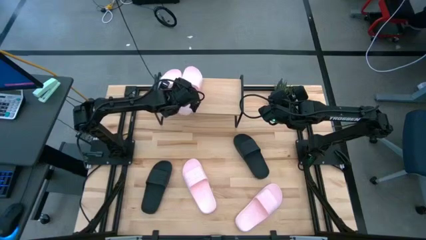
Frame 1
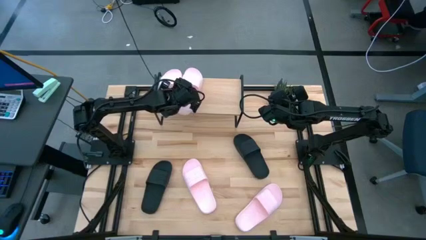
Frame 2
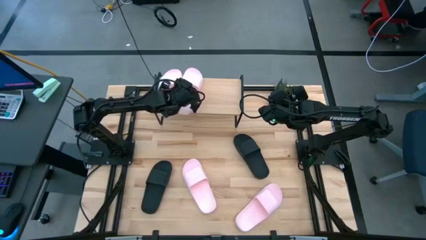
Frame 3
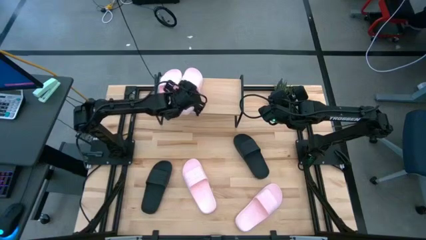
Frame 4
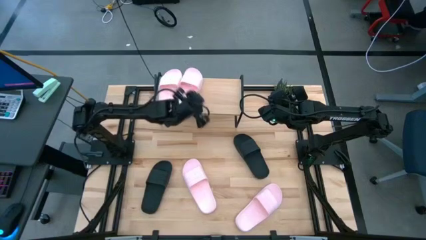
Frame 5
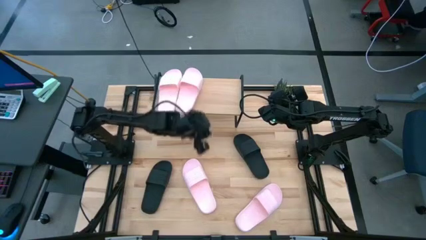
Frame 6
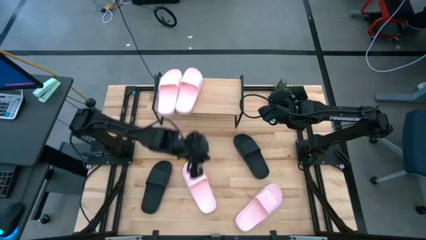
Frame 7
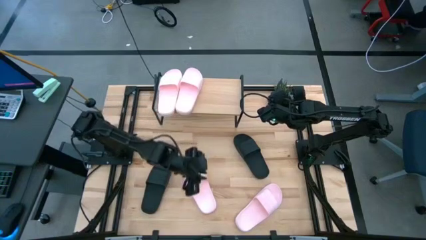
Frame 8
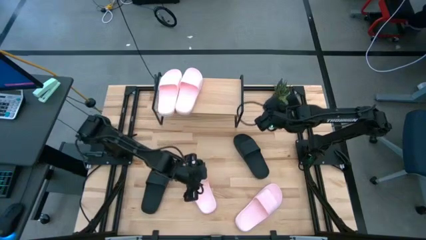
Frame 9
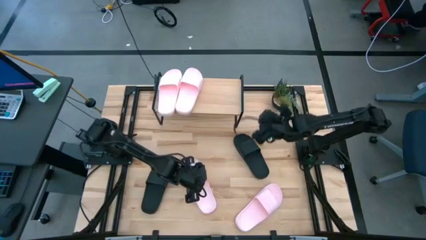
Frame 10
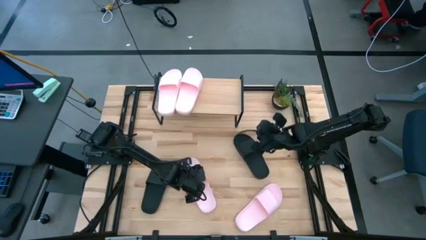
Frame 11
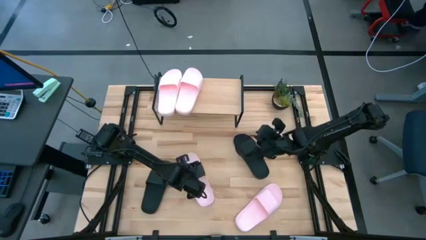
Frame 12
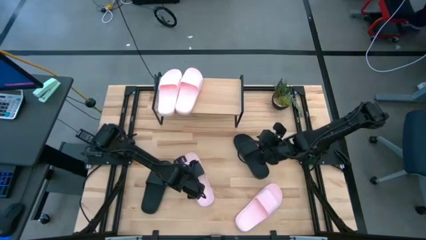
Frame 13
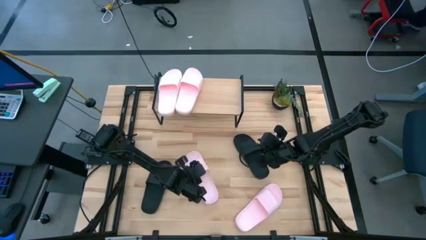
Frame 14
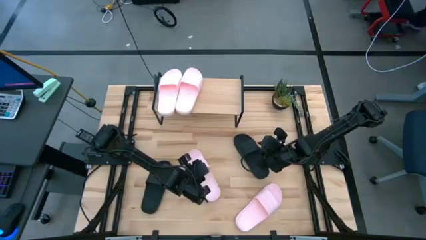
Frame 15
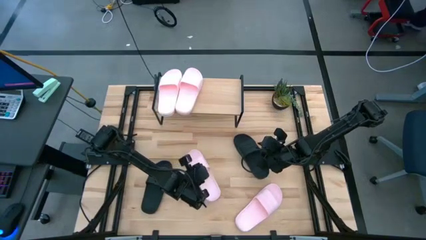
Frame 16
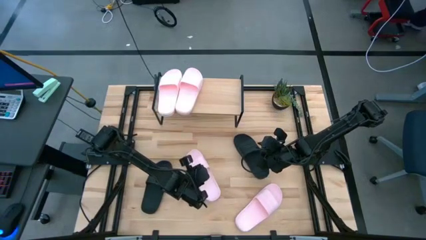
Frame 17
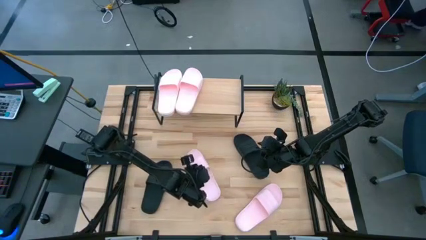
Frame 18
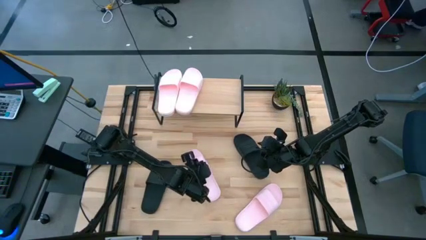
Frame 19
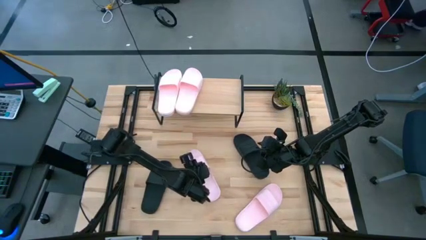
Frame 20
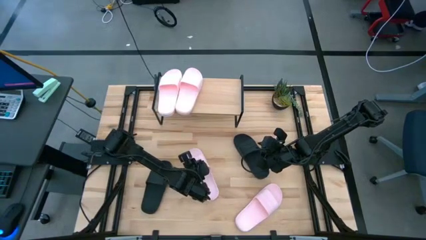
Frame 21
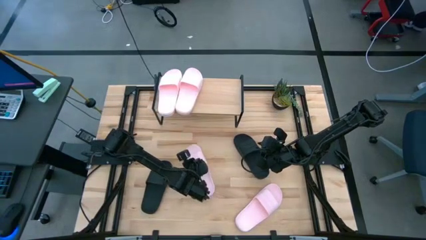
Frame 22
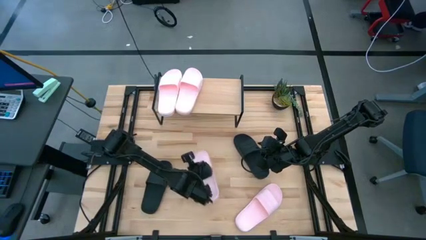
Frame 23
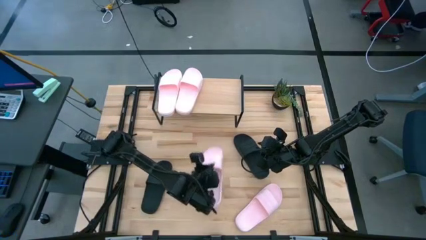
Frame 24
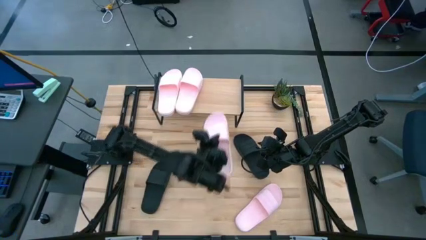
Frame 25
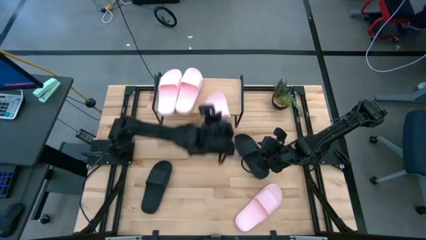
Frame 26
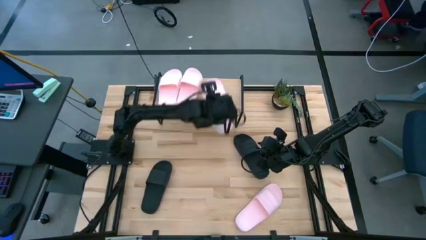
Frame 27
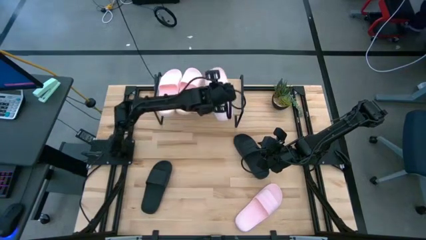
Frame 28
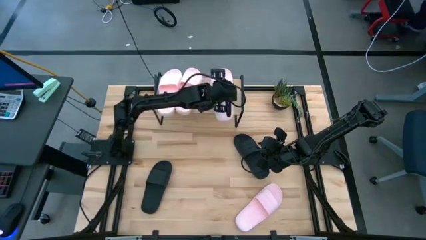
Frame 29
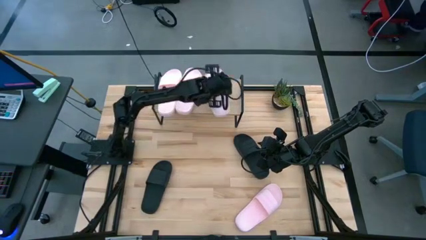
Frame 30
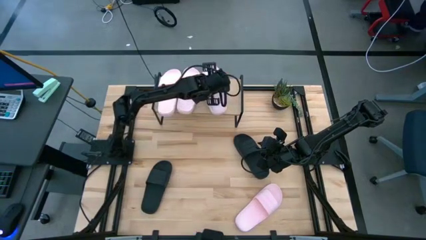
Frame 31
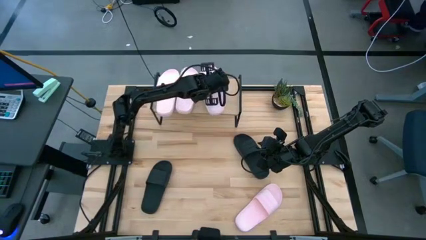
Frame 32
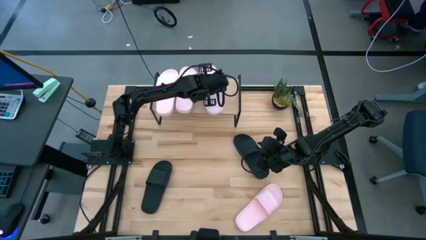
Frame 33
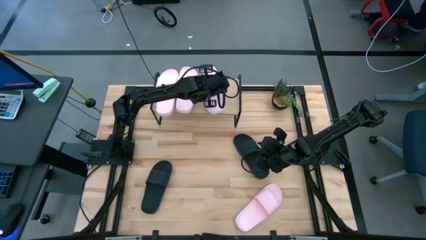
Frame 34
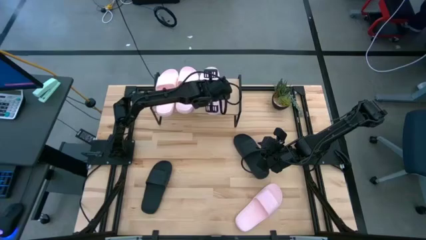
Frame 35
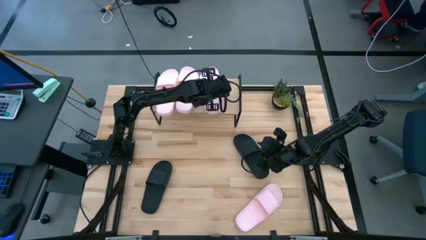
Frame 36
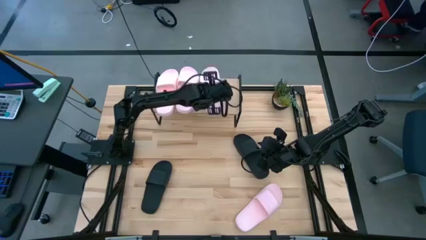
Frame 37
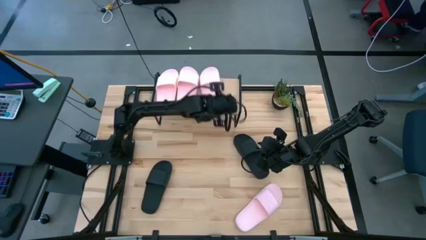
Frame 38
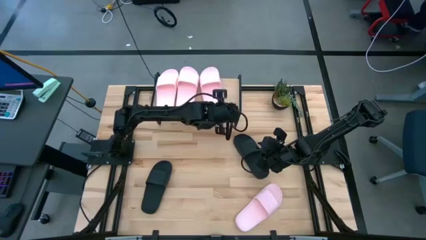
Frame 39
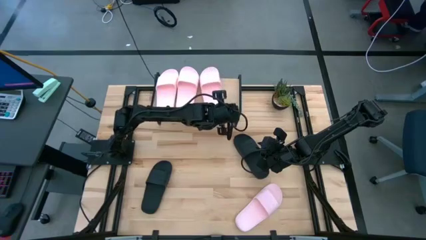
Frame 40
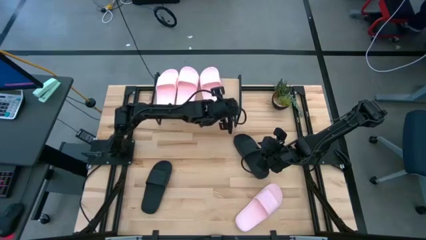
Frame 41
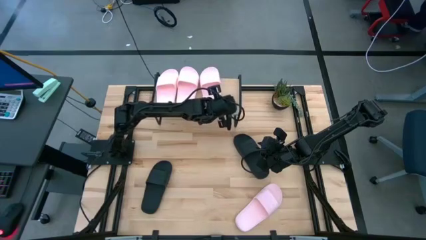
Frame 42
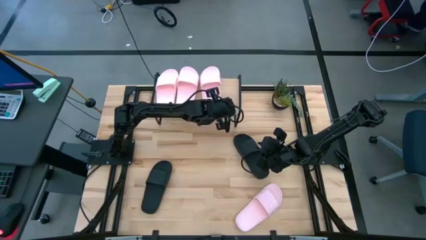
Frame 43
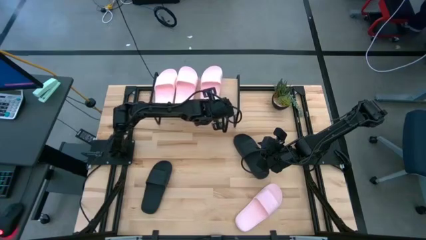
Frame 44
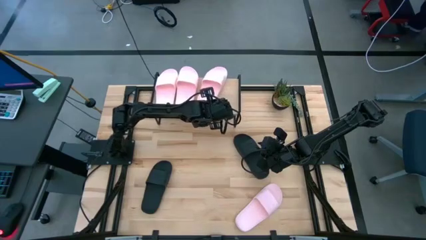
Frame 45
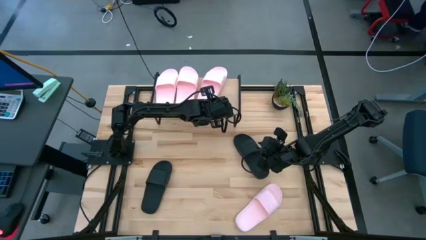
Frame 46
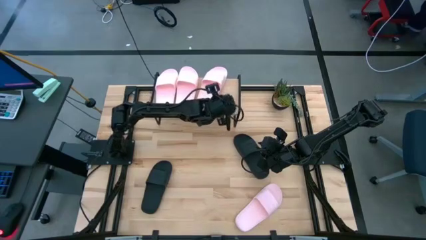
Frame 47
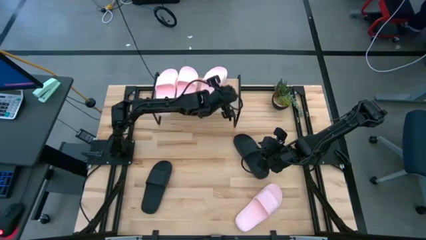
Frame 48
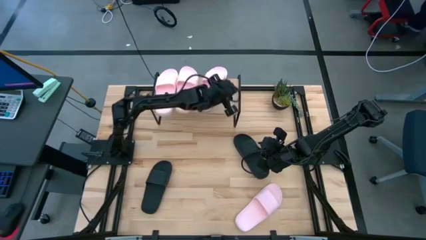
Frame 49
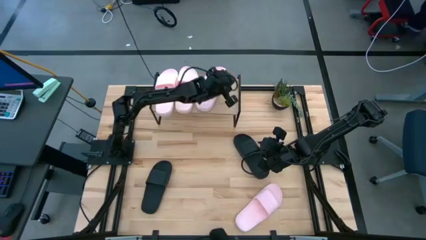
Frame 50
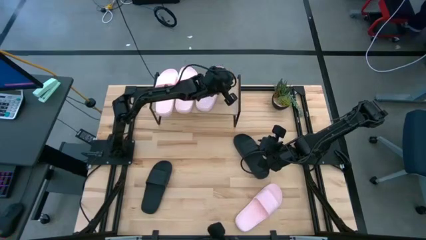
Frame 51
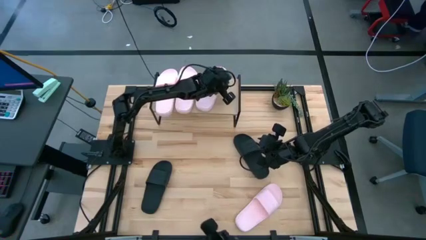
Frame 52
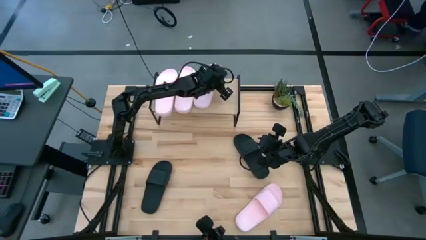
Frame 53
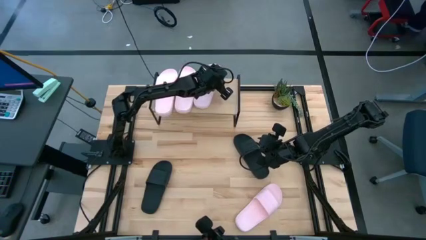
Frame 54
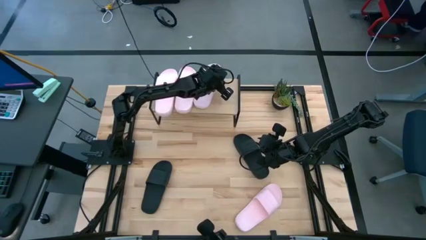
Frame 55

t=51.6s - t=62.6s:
Task: Pick and place slides into the shelf
Put the left pink slide on the shelf

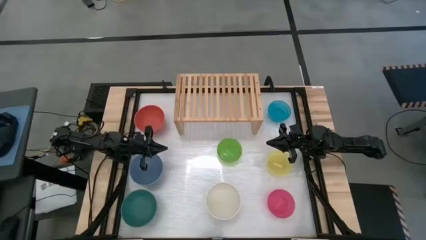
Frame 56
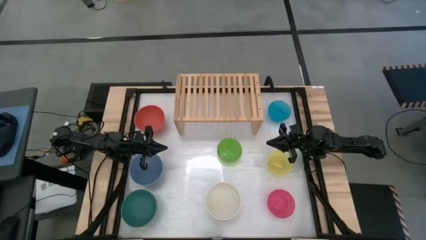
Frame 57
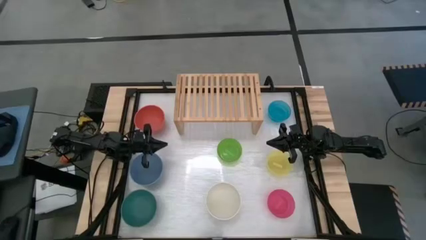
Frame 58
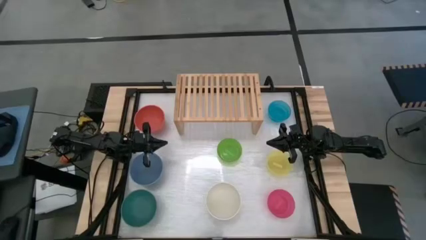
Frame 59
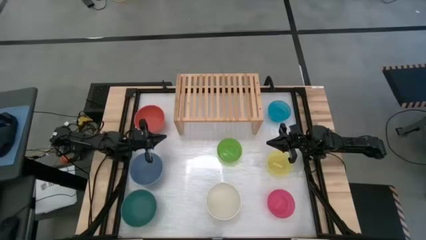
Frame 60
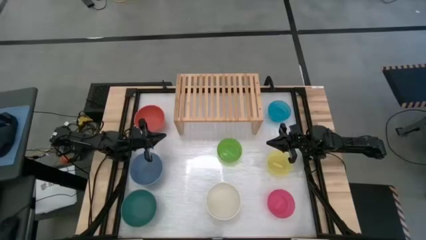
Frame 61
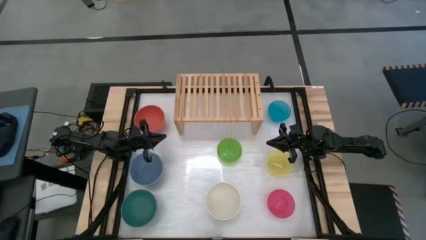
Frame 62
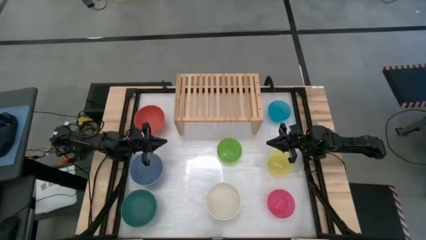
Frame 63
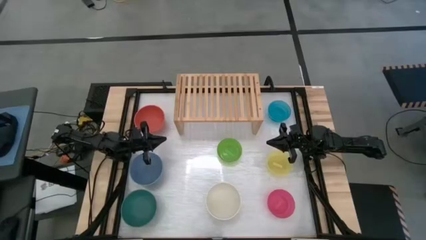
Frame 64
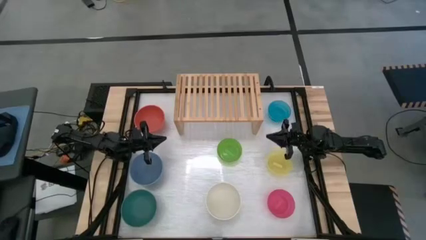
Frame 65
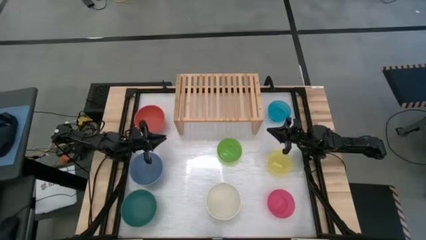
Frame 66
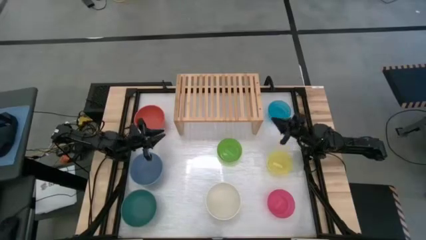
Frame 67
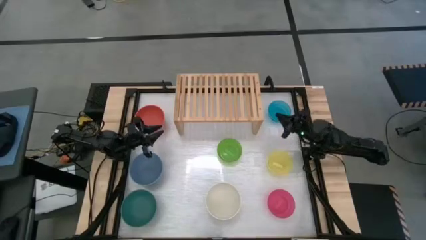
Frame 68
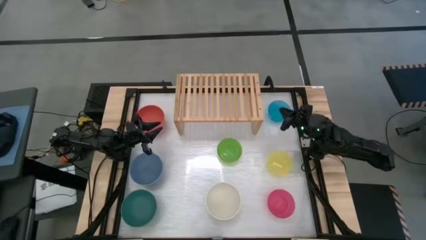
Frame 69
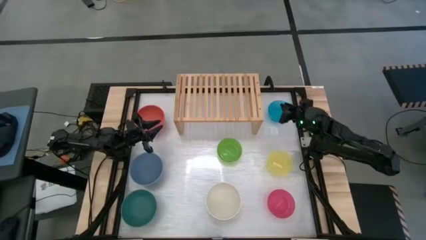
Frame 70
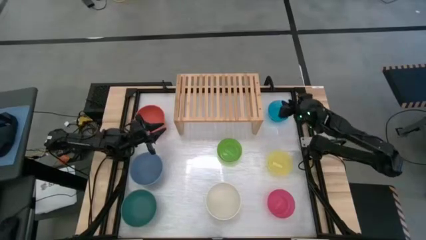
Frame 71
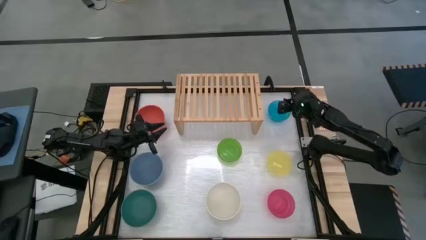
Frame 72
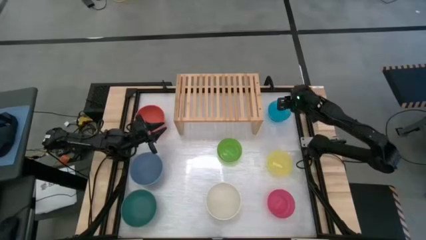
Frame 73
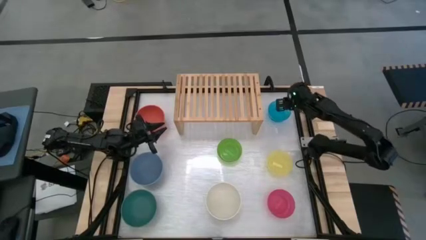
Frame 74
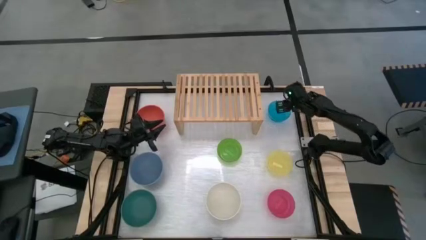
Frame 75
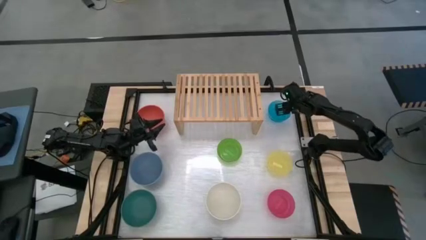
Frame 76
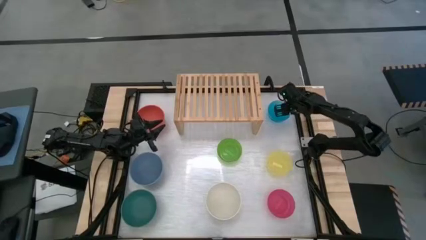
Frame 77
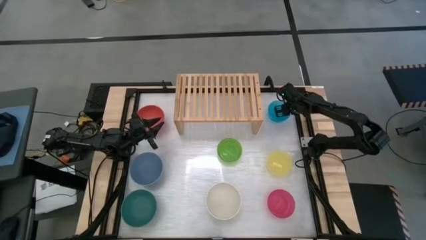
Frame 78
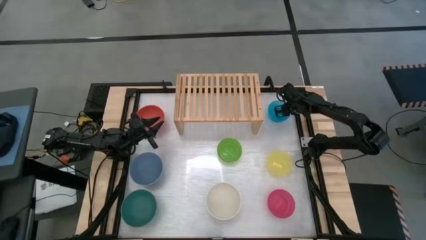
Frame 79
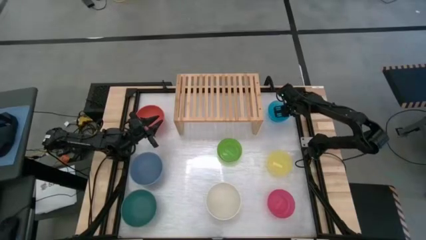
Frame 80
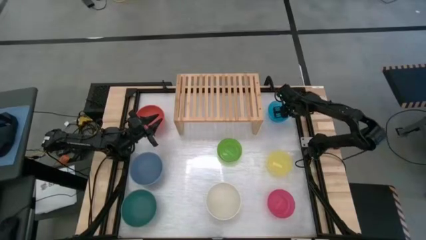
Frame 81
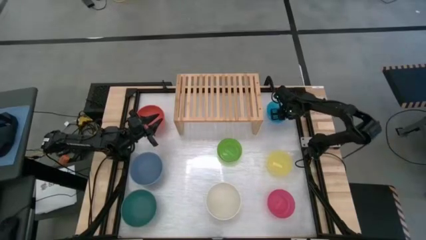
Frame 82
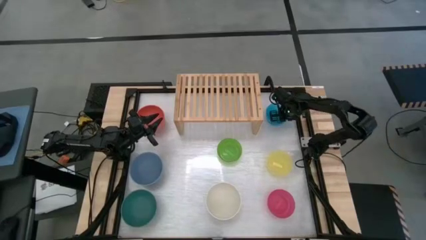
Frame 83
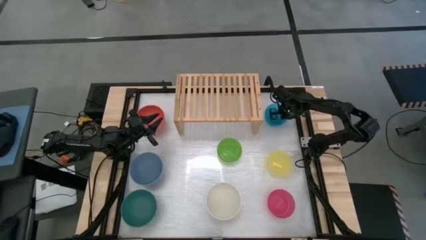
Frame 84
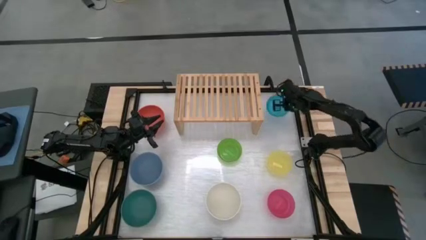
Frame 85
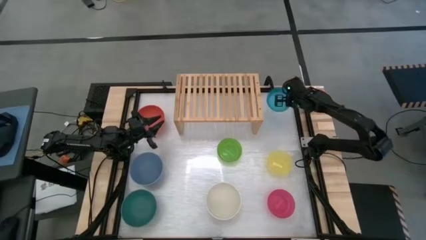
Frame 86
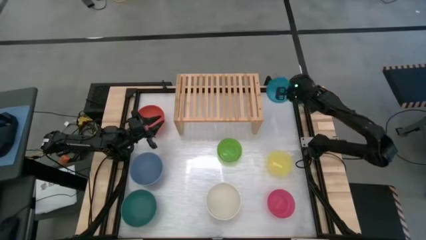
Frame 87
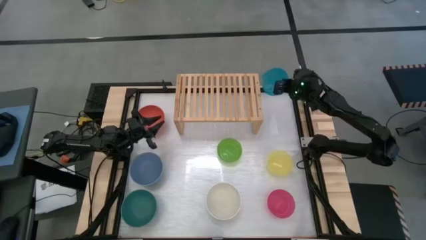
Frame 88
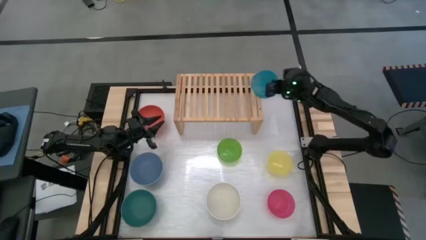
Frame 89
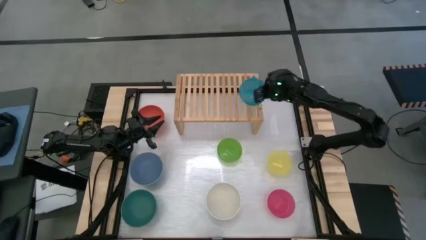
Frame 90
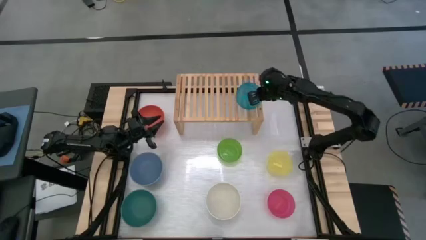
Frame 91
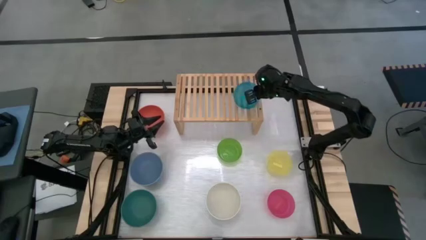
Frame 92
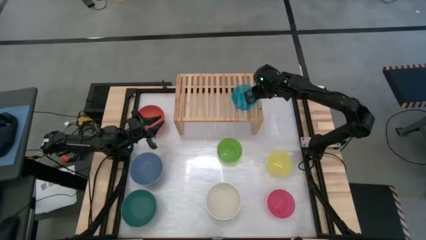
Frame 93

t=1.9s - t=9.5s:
Task: Place and stack bowls onto a shelf
Put the blue transparent bowl on the shelf
